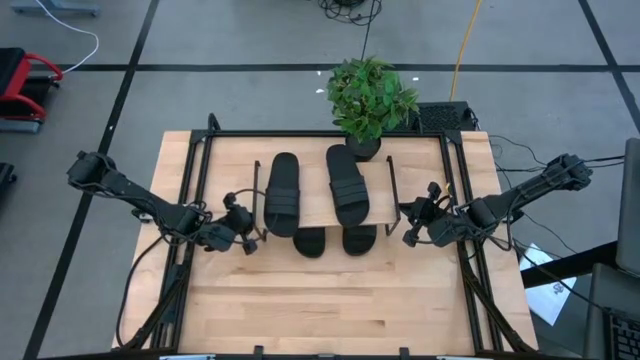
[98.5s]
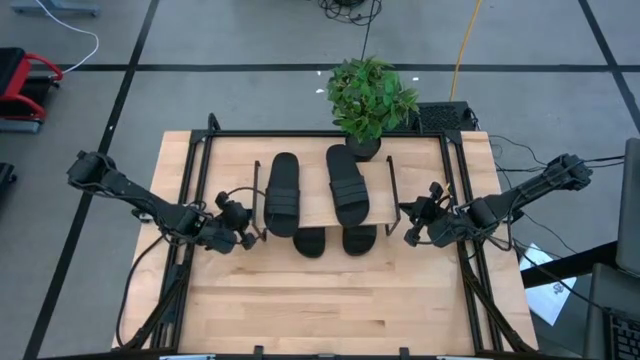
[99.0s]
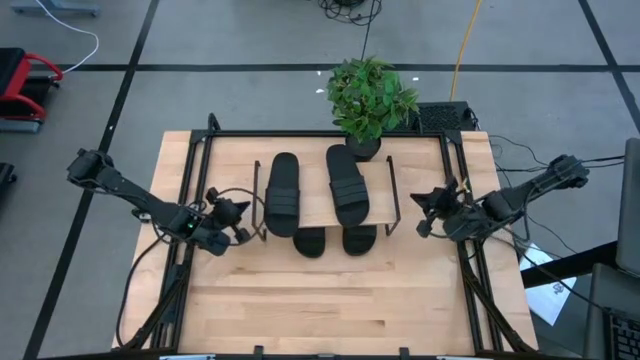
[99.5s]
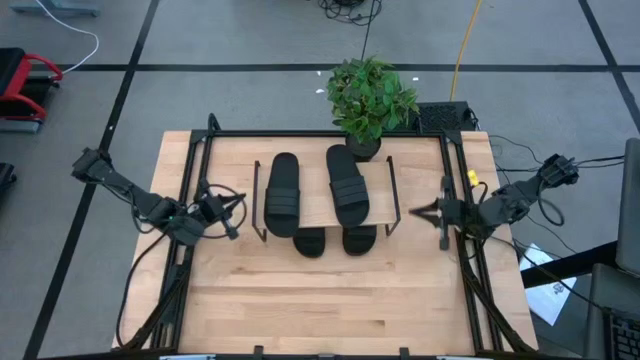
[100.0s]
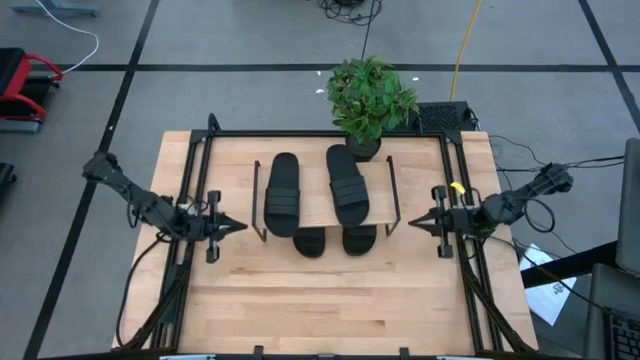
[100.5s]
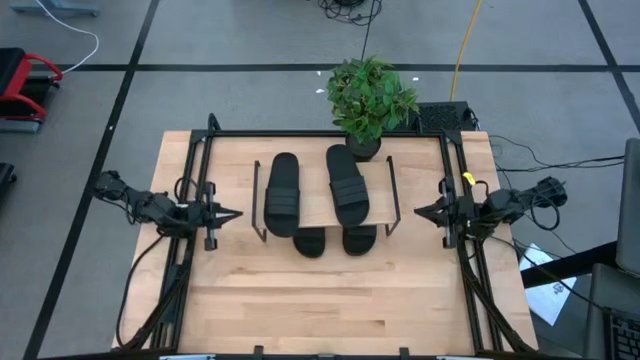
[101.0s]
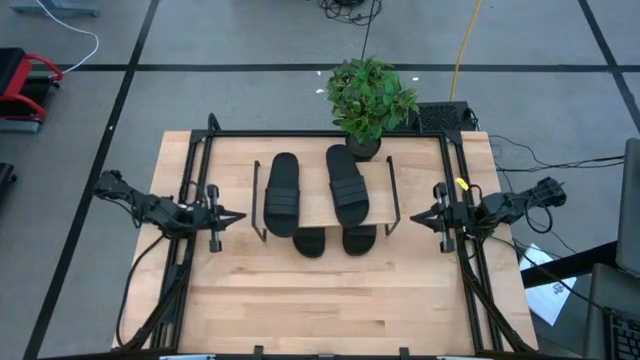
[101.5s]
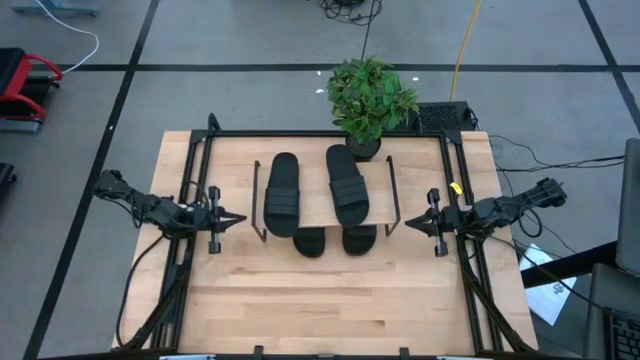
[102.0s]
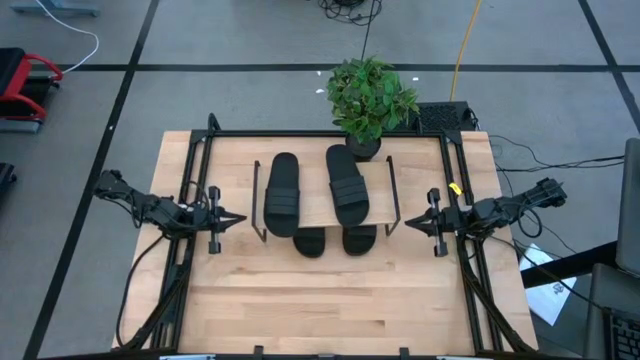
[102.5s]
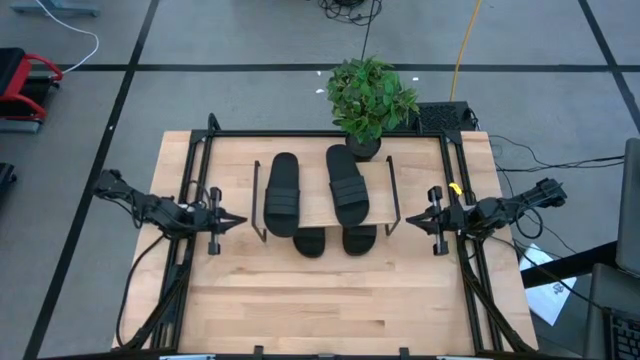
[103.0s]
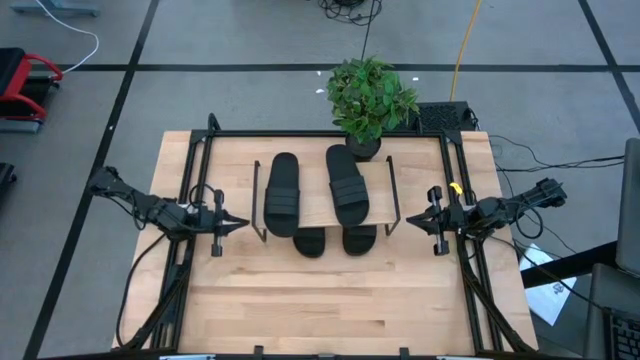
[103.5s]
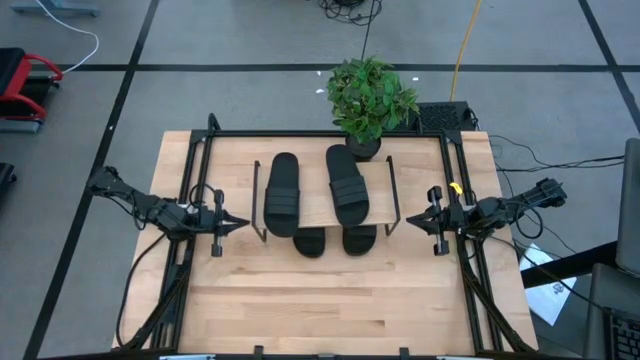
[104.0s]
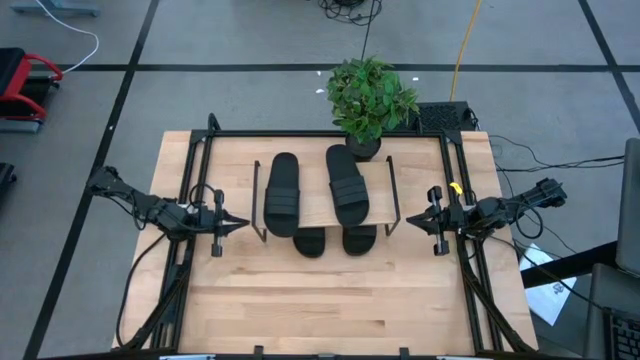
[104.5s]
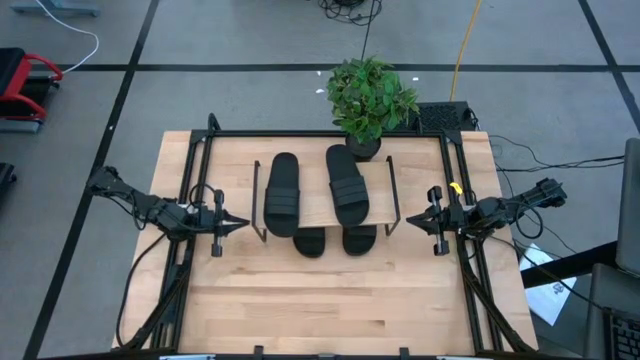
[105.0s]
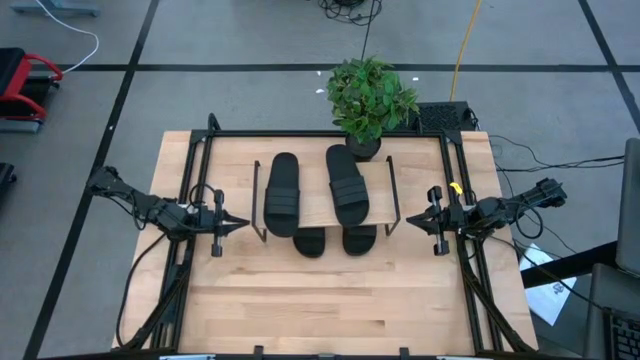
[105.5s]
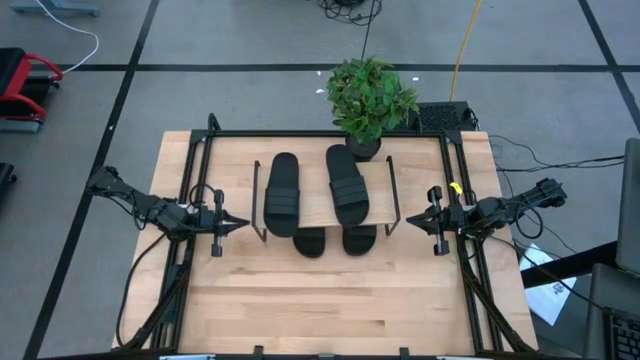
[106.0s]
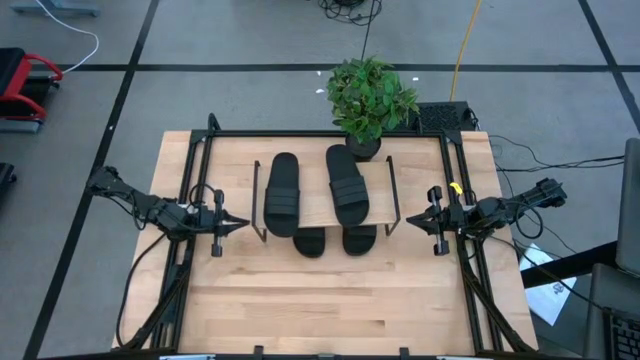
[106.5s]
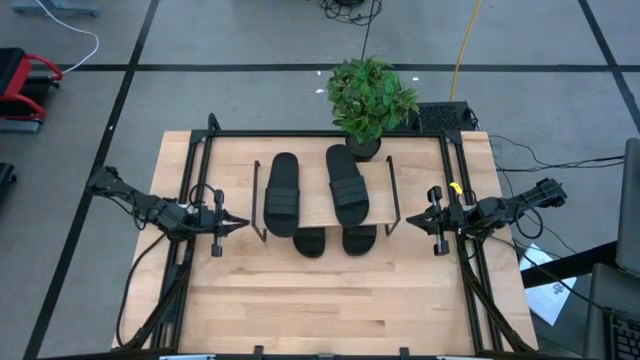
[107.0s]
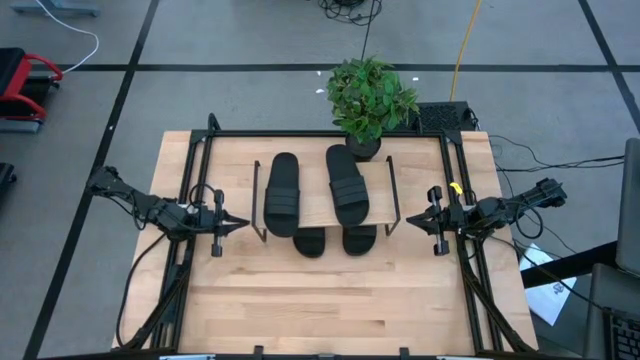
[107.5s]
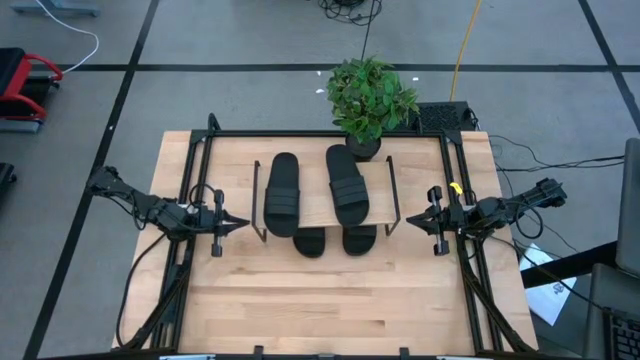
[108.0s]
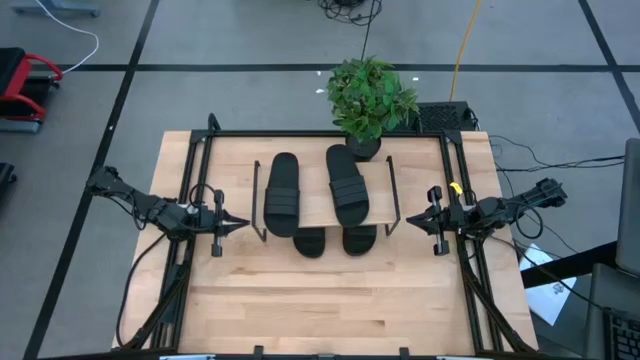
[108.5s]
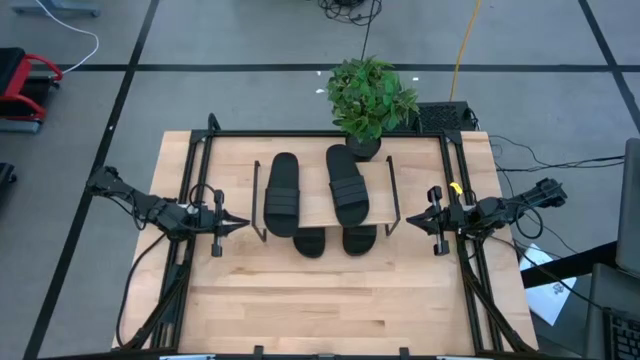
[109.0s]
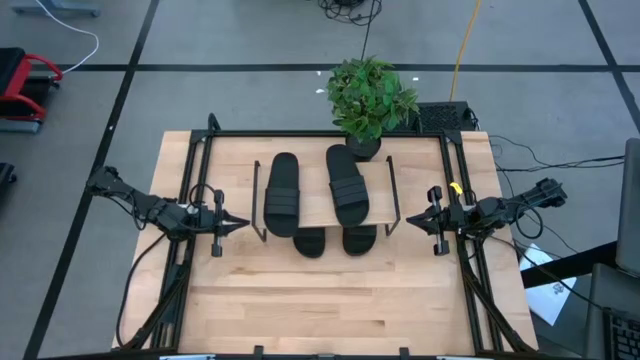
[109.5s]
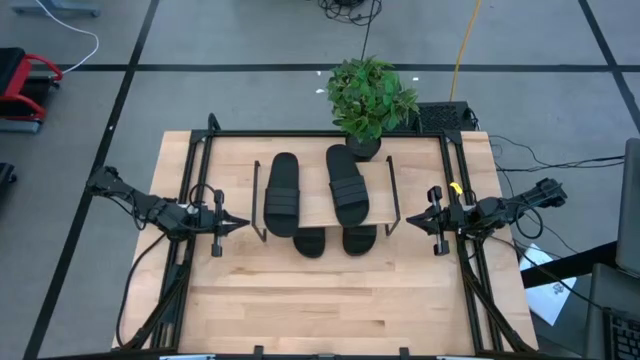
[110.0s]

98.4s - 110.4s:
Task: Pick and place slides into the shelf
Return to Home Position

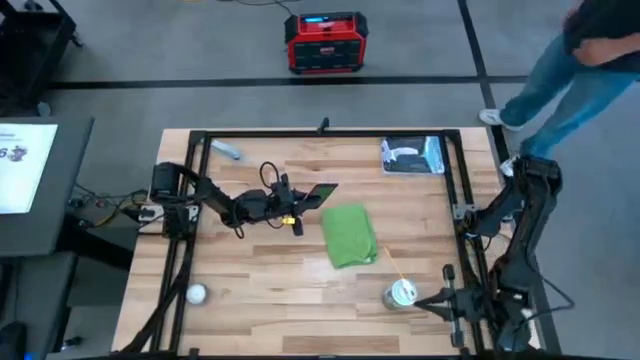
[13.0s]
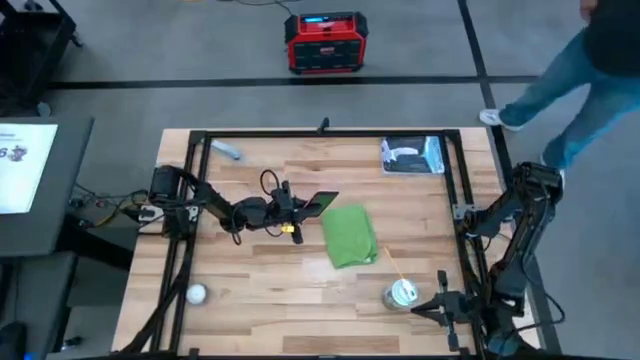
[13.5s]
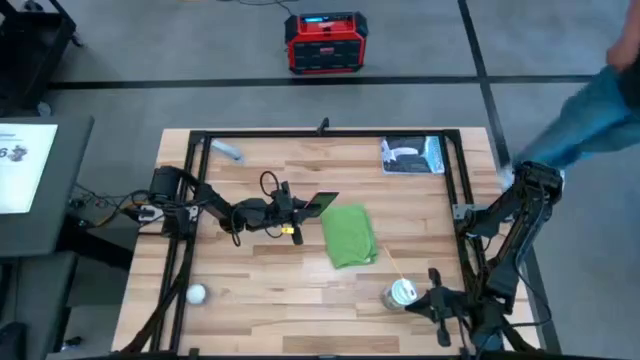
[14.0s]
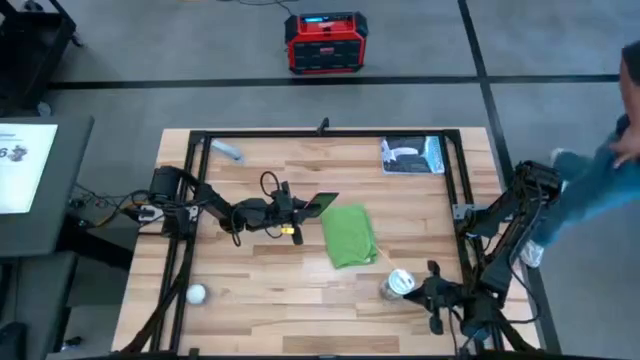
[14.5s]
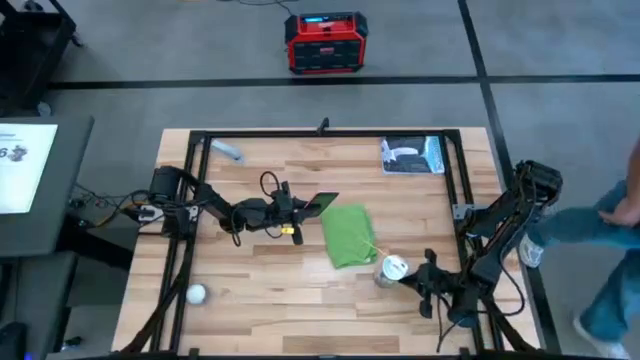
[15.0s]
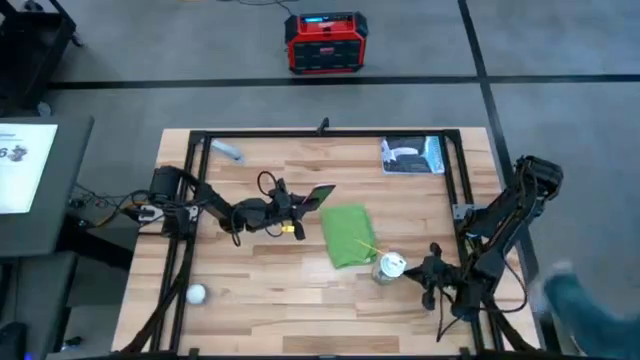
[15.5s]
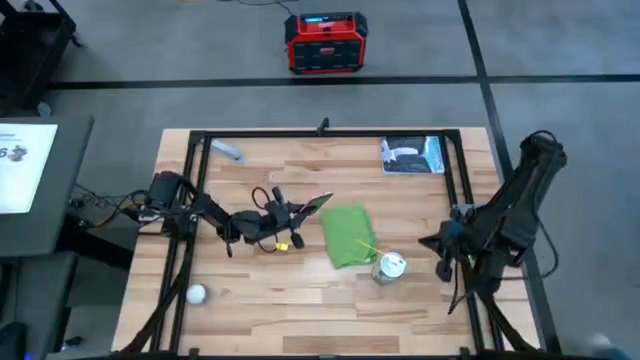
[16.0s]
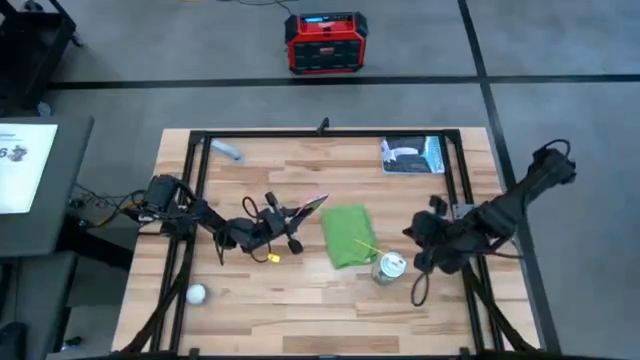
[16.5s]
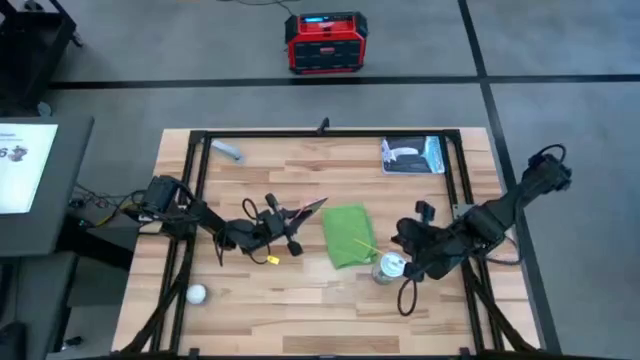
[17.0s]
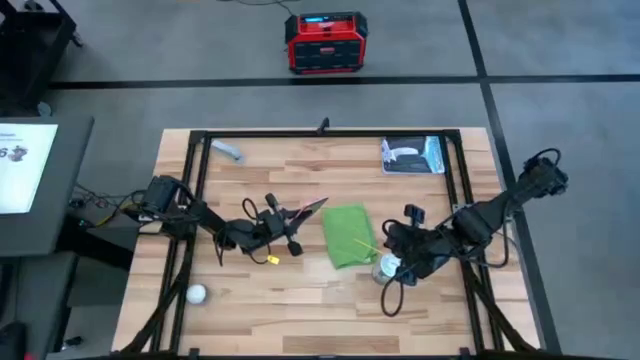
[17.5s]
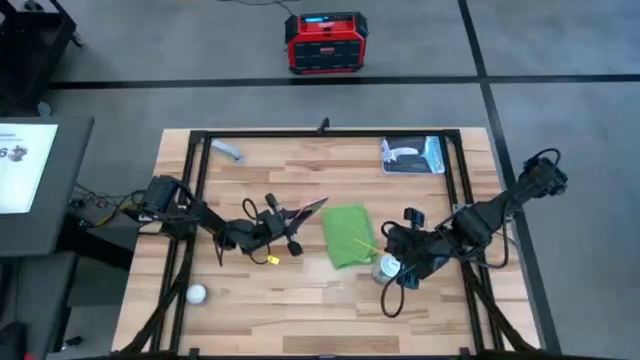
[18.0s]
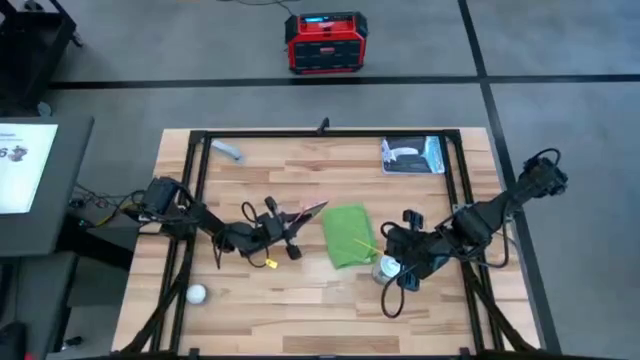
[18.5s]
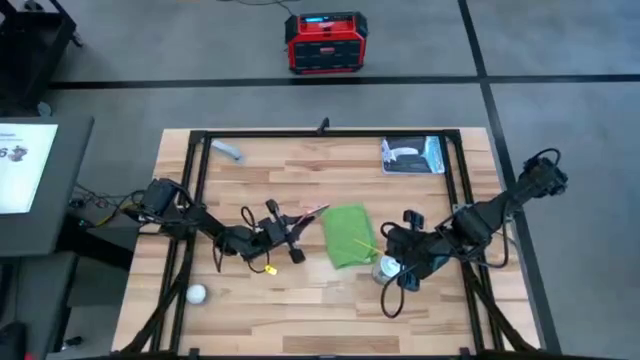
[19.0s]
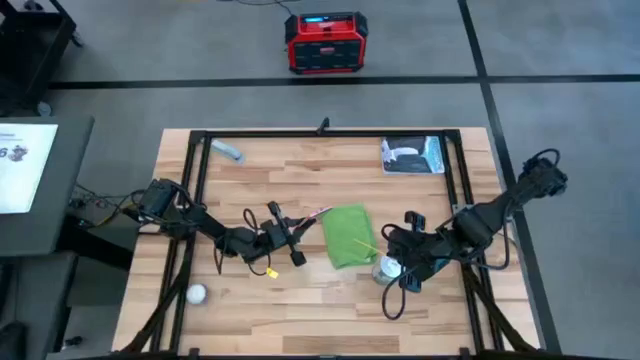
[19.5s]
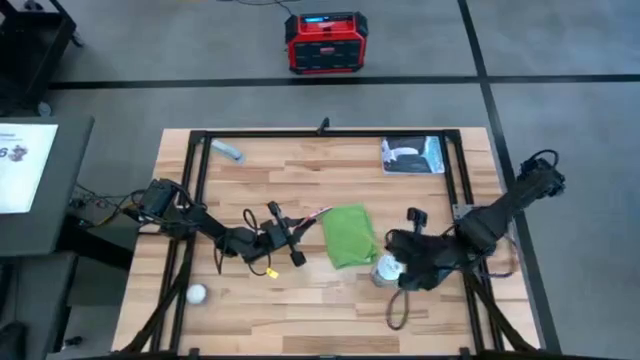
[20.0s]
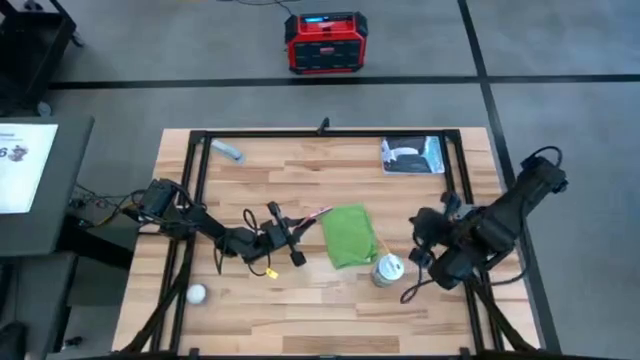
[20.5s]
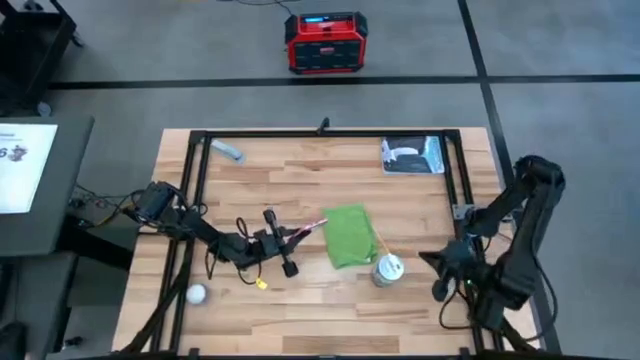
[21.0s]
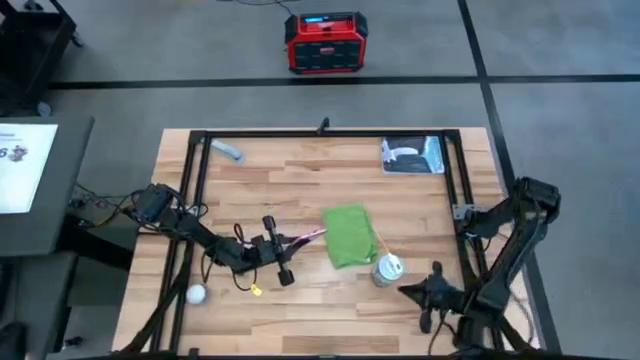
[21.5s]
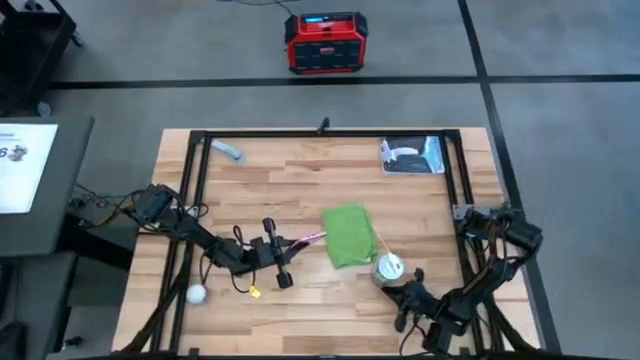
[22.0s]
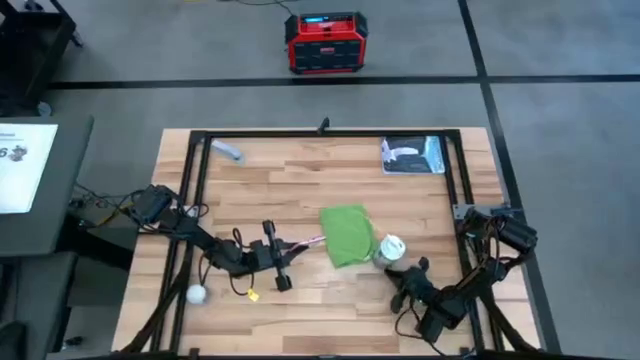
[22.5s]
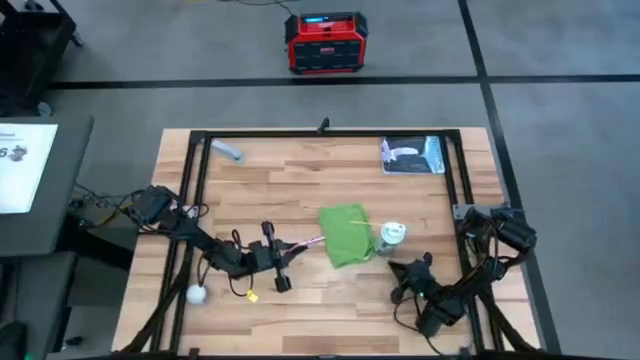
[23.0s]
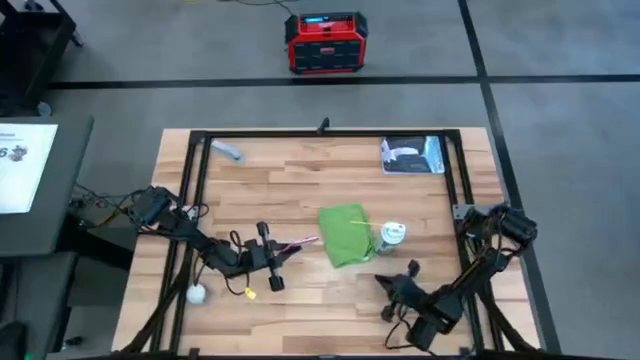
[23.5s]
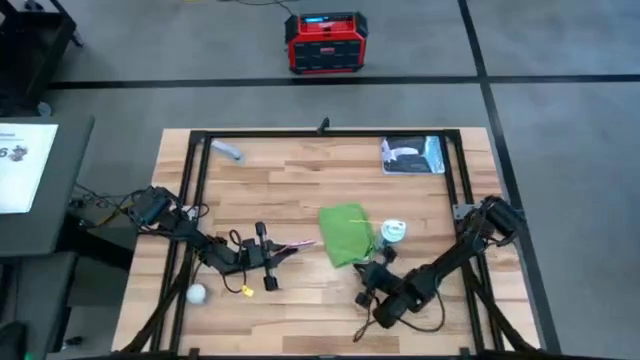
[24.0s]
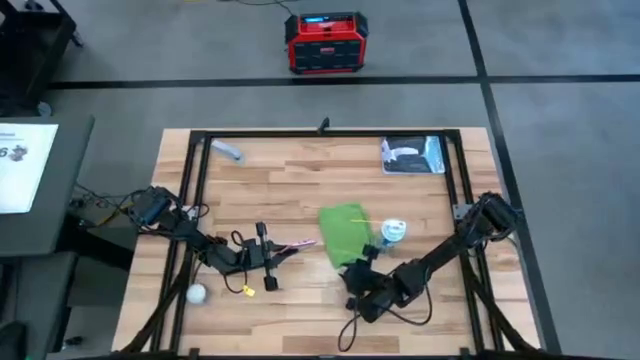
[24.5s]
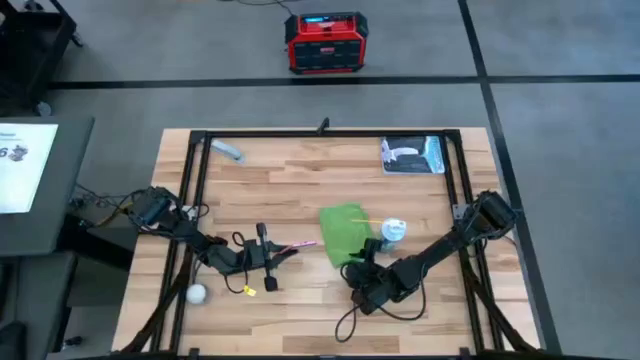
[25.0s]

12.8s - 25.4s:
Task: Apply microfiber cloth
Spray the cellphone using the cleaning bottle
